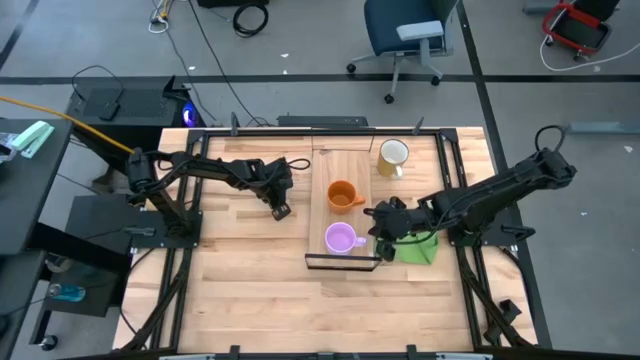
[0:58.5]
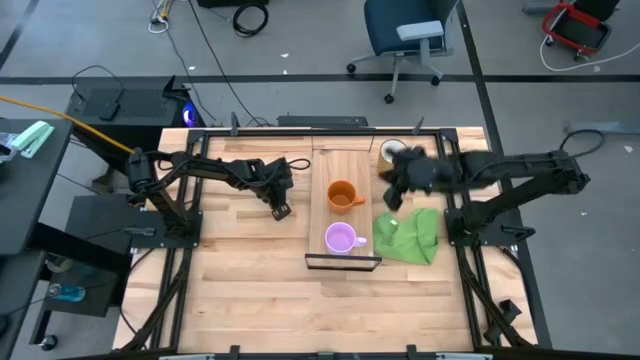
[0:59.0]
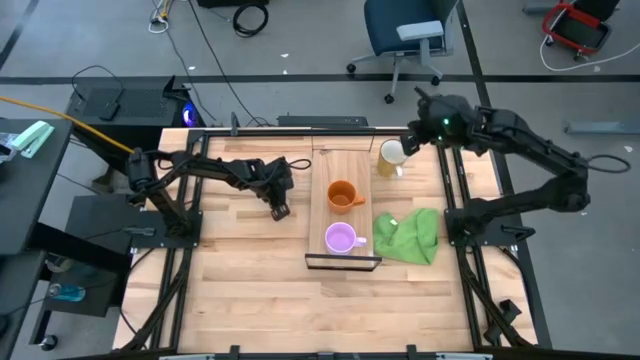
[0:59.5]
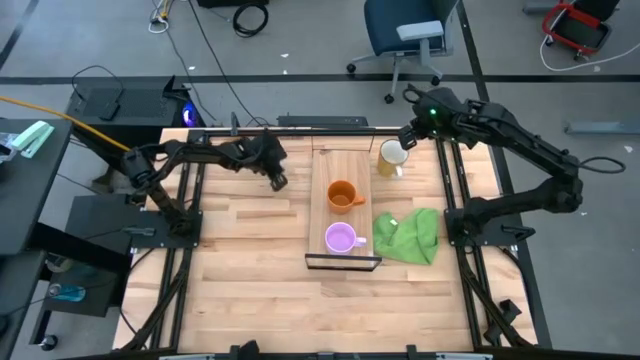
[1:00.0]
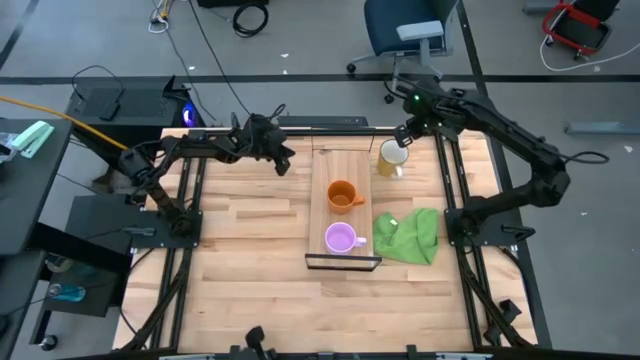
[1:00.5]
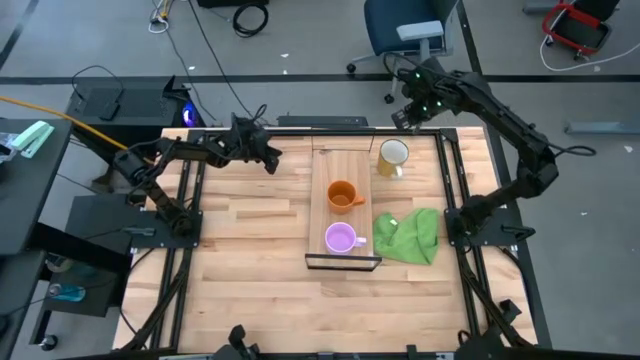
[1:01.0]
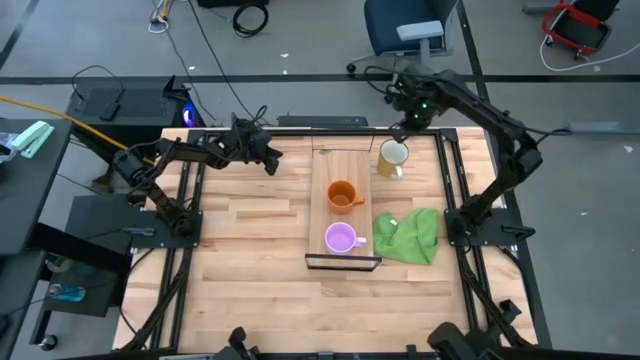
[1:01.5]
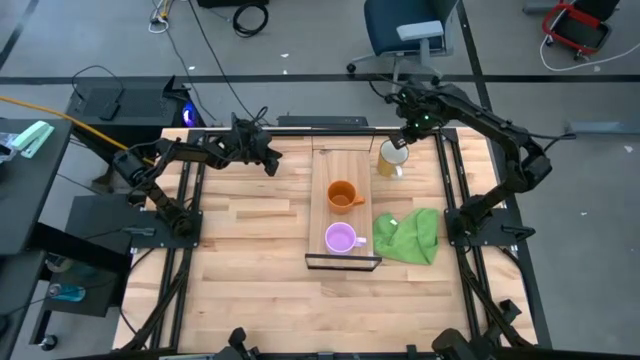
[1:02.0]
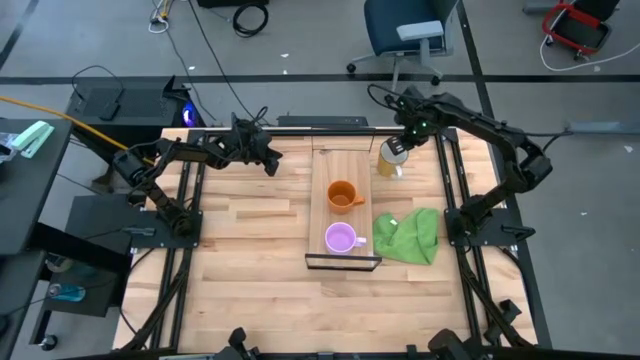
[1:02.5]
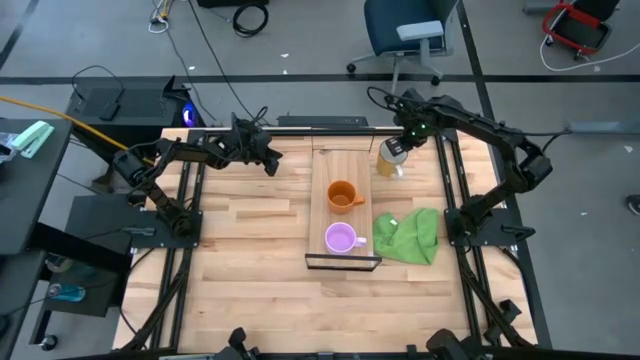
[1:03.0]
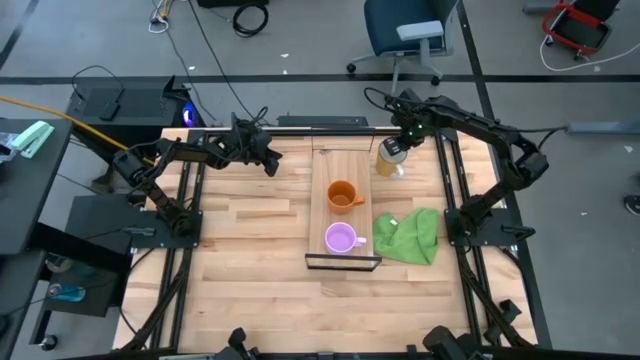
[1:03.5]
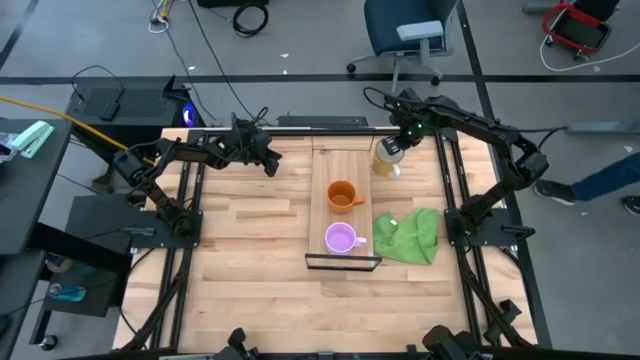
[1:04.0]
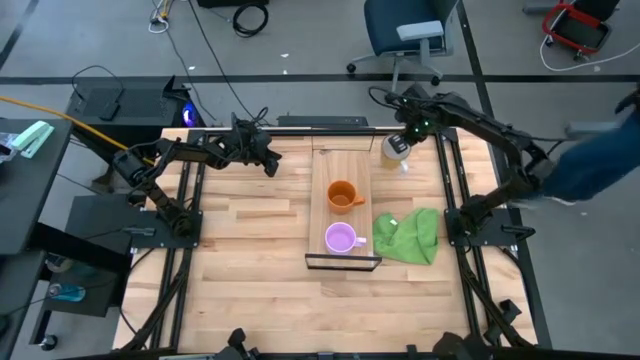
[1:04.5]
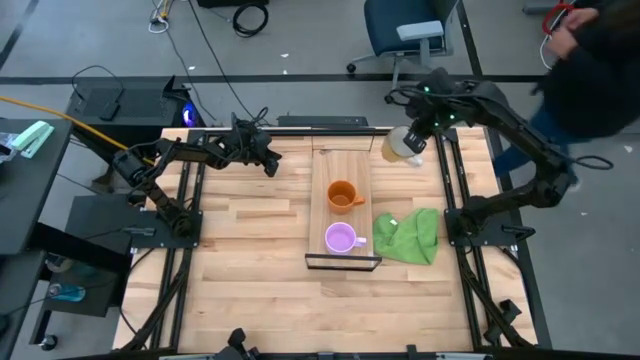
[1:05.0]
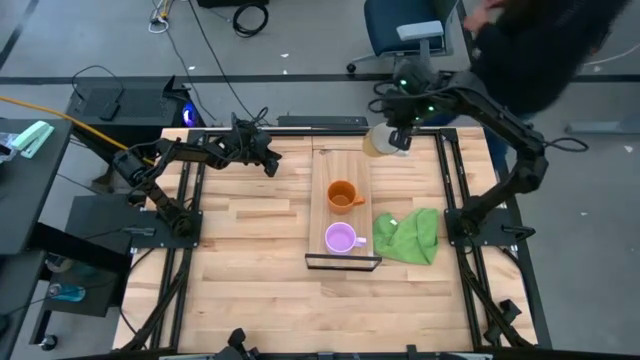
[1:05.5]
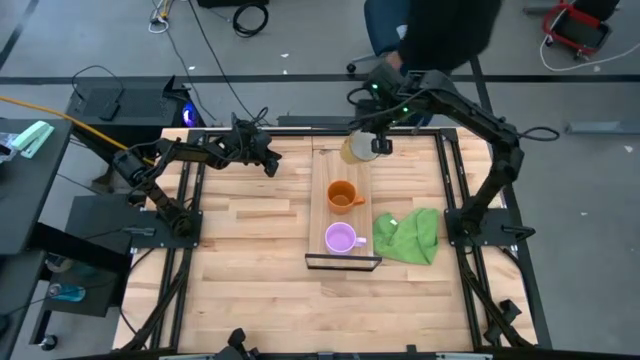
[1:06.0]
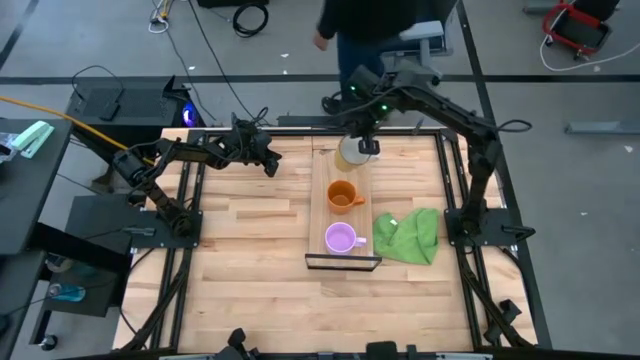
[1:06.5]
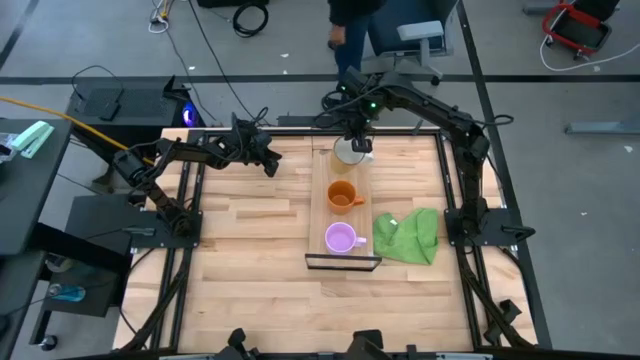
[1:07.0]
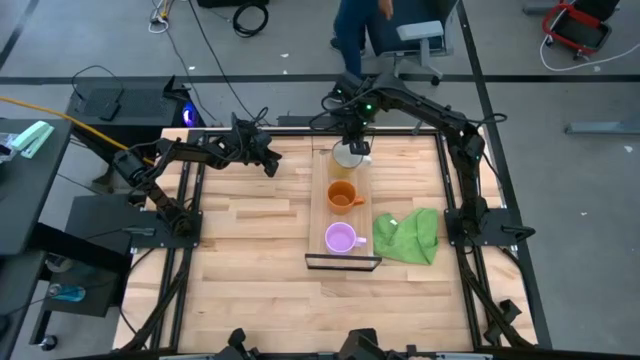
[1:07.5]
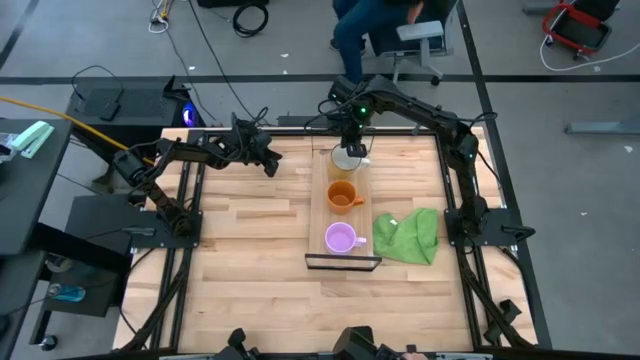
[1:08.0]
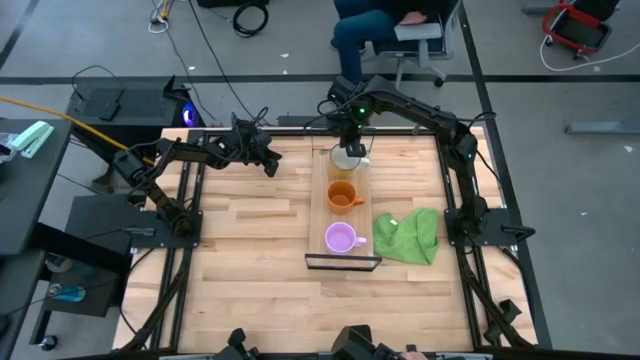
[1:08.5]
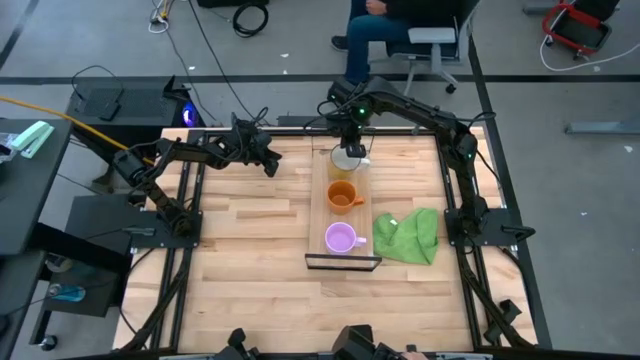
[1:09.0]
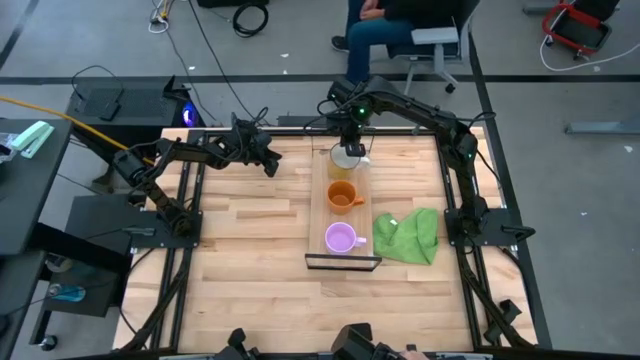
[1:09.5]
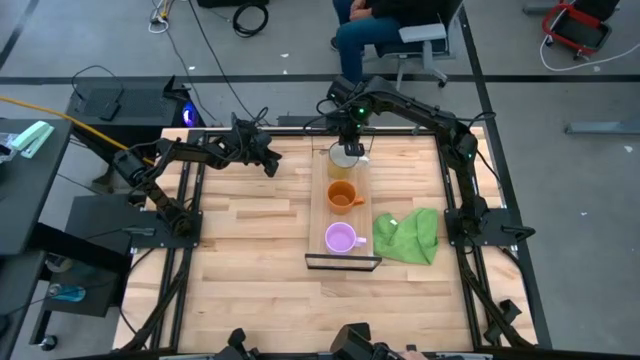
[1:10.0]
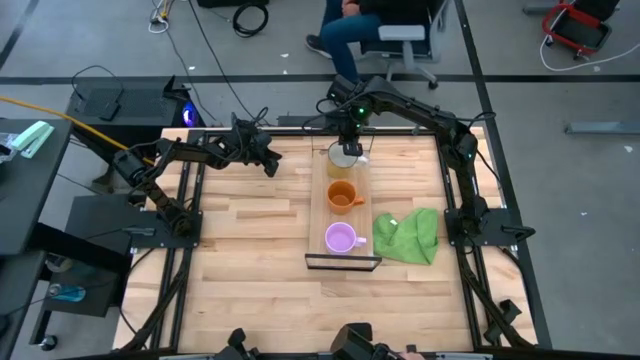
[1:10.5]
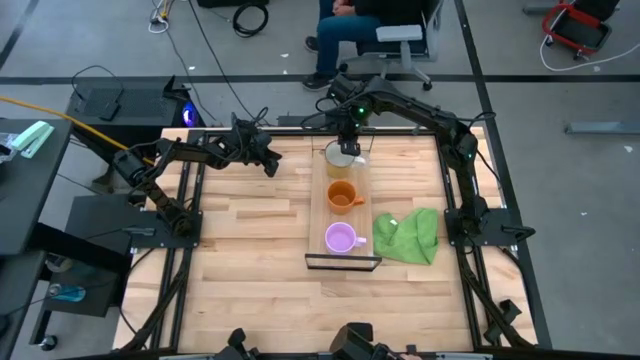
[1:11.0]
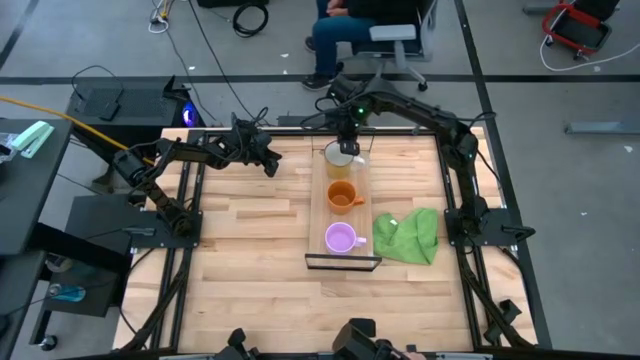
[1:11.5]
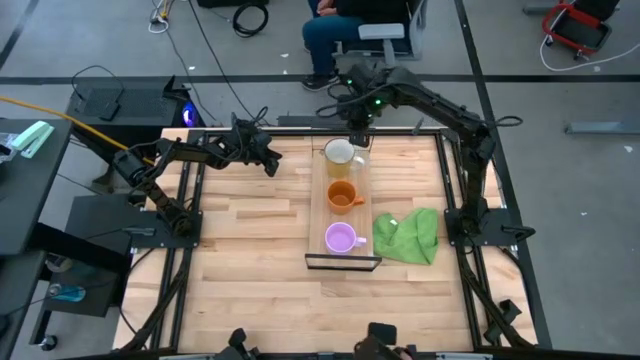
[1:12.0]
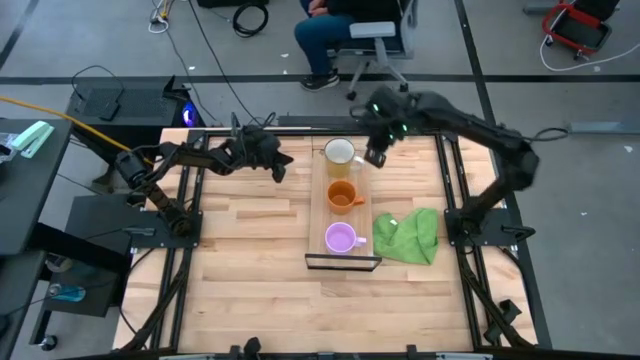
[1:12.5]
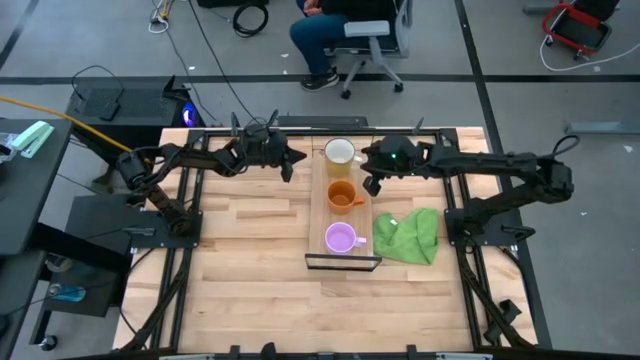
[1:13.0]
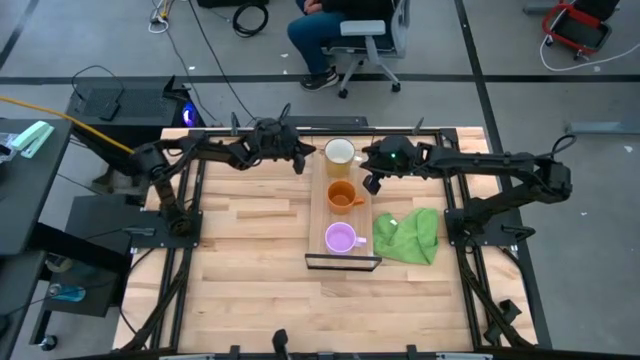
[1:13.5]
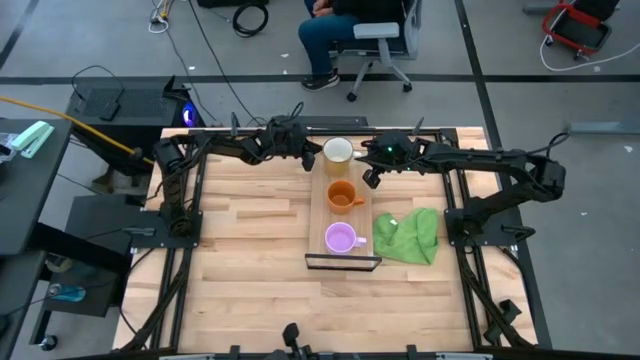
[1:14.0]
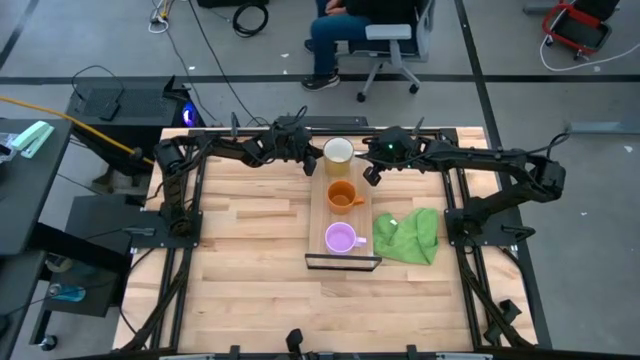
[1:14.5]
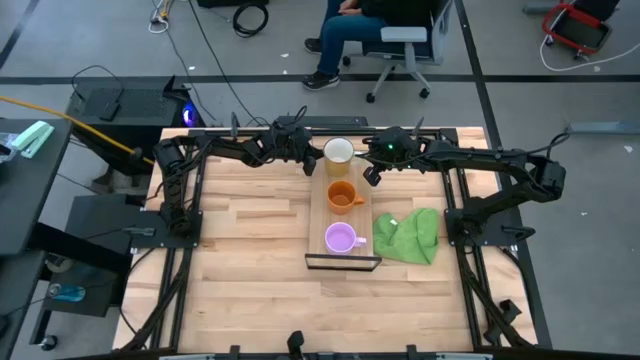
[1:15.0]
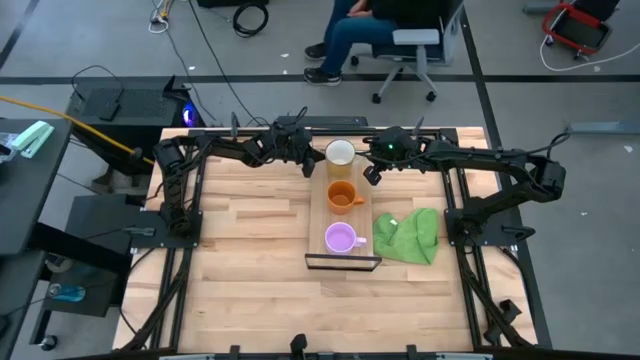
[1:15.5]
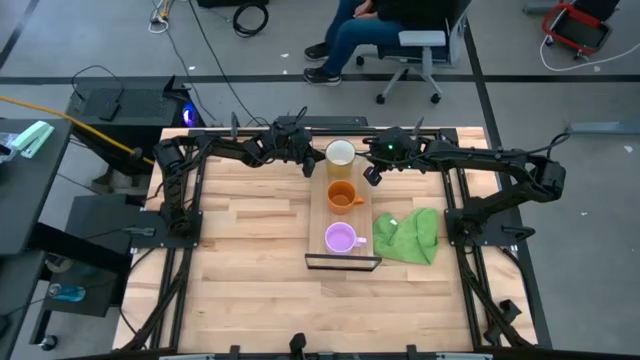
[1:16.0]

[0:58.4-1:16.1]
Task: Stack small to large cups/mugs on shelf
Put the yellow mug on the shelf

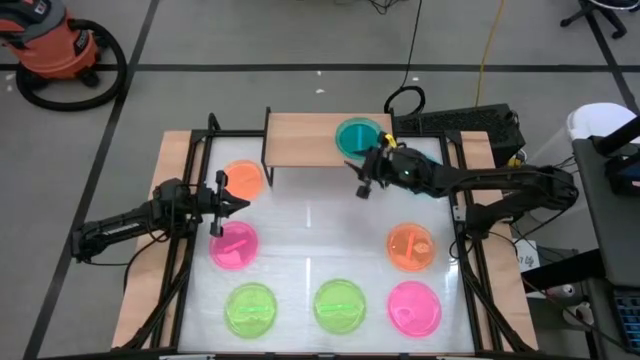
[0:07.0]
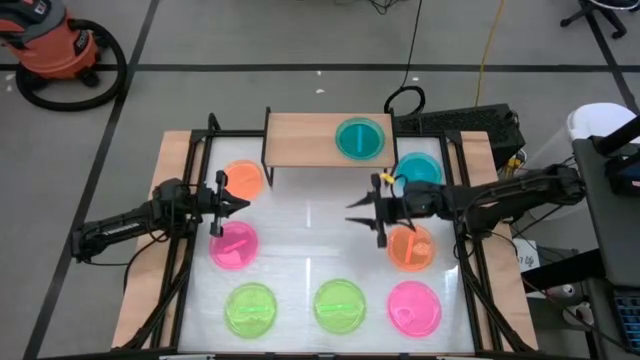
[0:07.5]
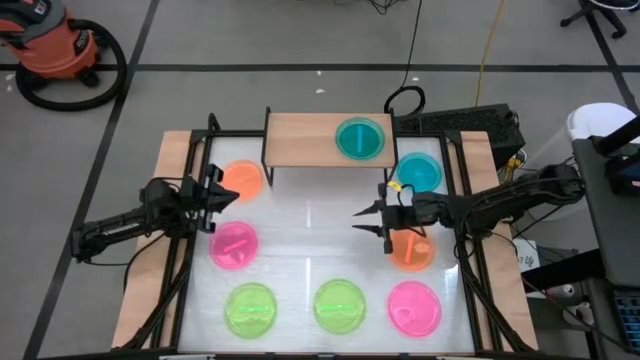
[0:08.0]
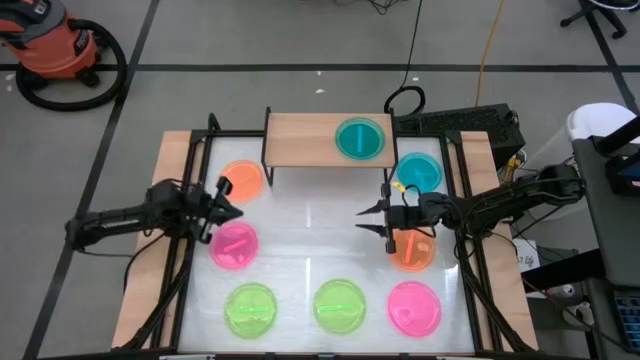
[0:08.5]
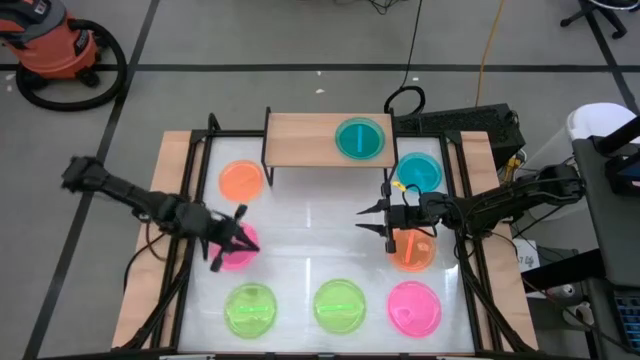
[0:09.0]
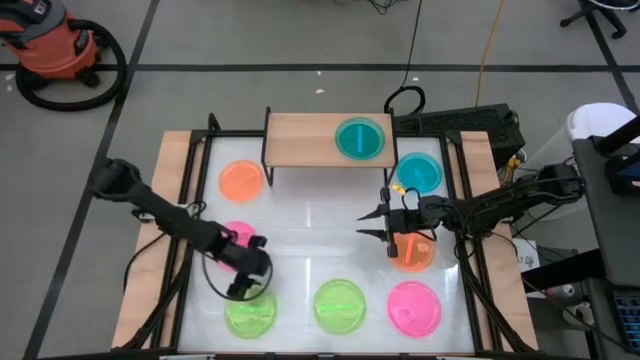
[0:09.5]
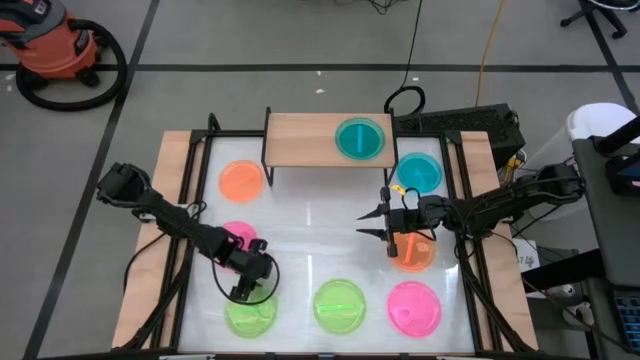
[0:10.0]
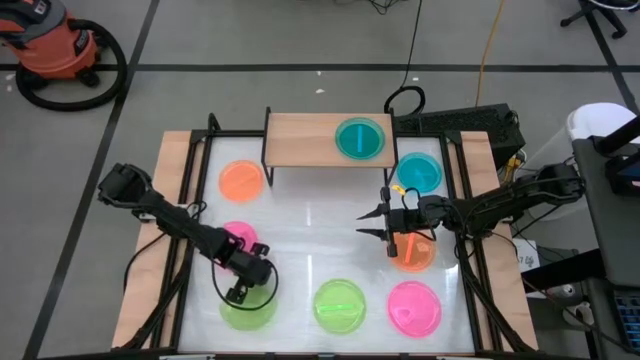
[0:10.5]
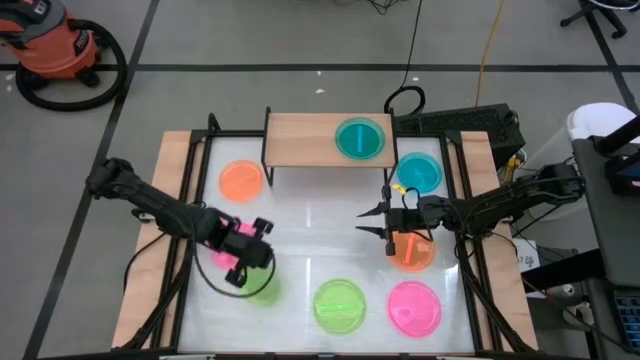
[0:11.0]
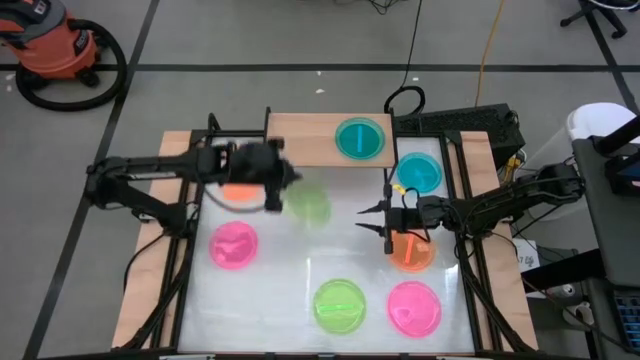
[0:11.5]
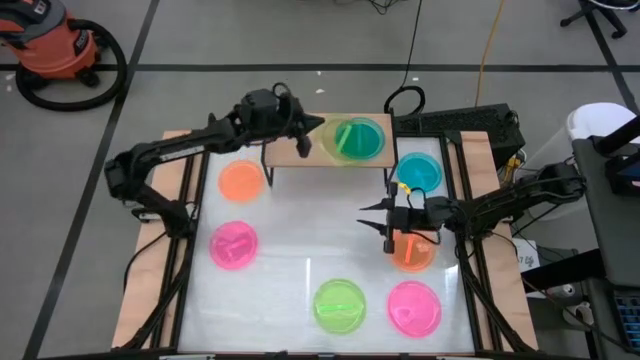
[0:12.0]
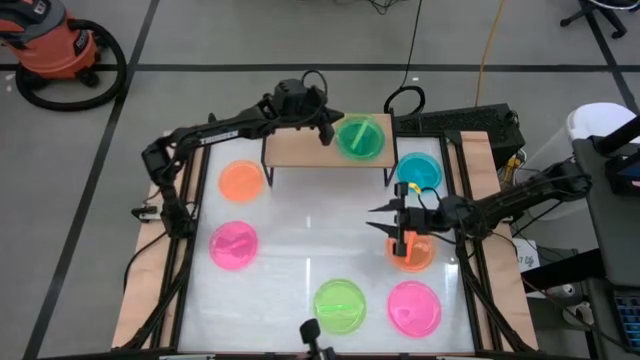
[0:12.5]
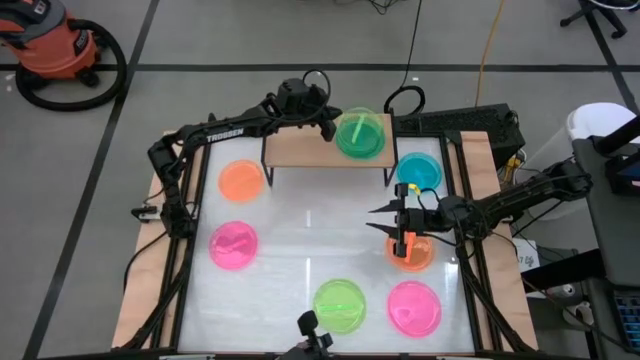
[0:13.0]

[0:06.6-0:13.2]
Task: Place and stack plates onto a shelf
Stack the left green transparent plate on the blue transparent plate on the shelf
